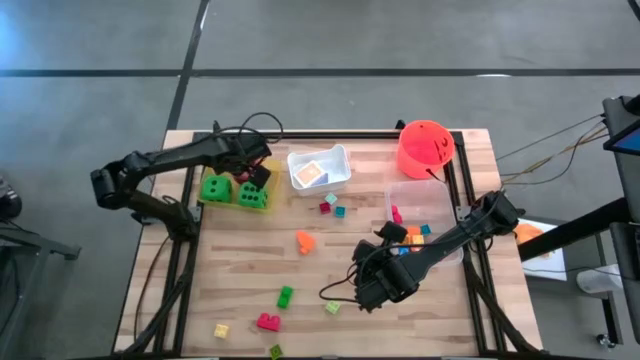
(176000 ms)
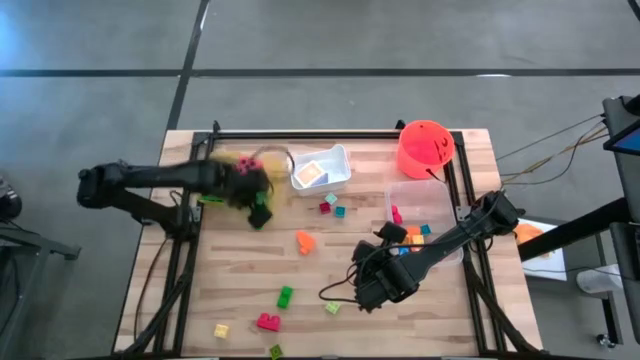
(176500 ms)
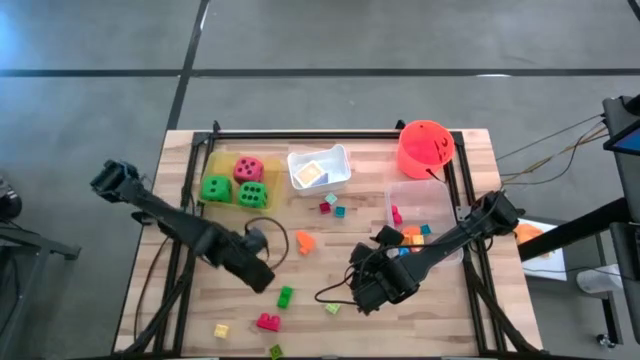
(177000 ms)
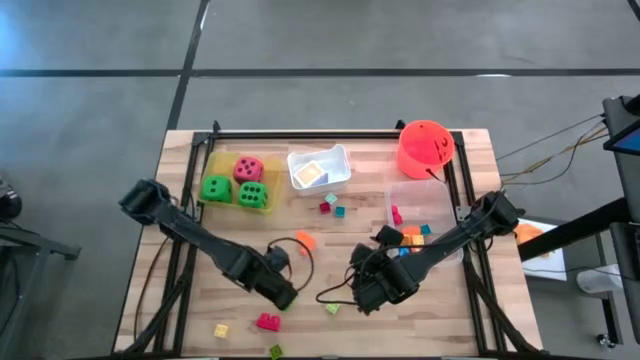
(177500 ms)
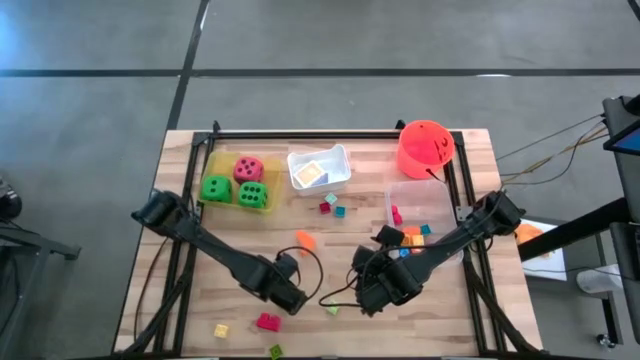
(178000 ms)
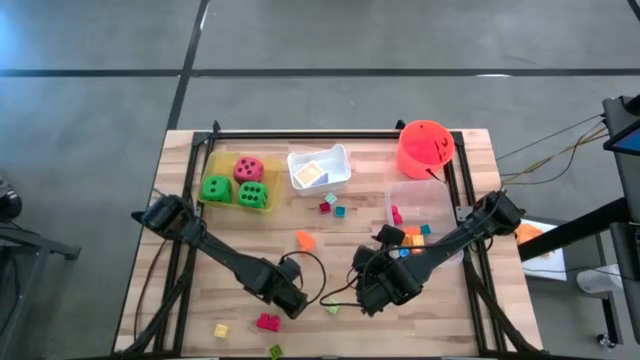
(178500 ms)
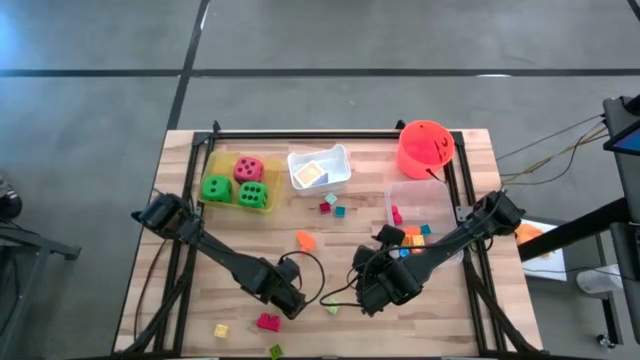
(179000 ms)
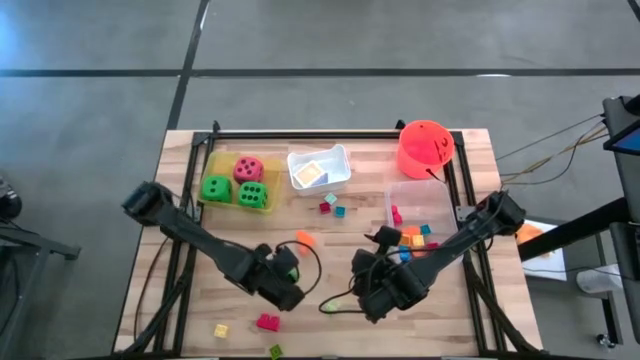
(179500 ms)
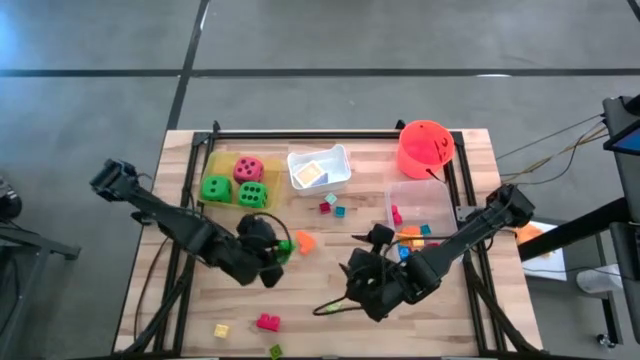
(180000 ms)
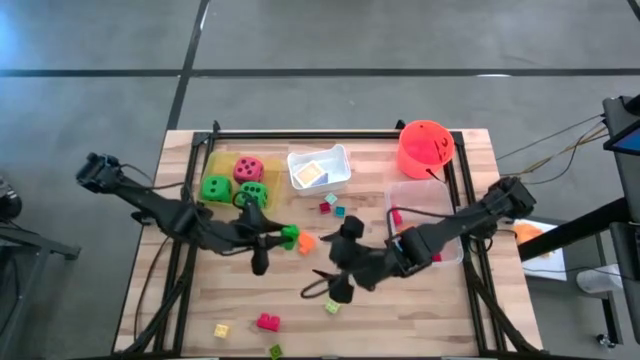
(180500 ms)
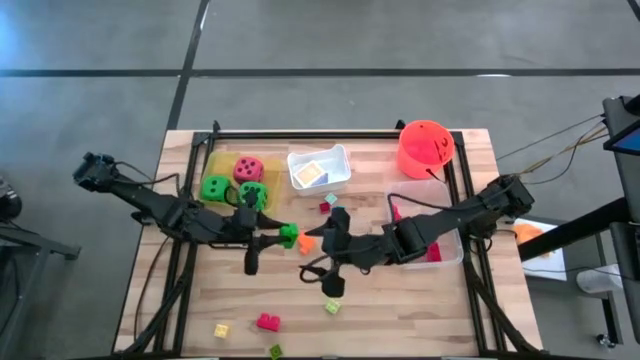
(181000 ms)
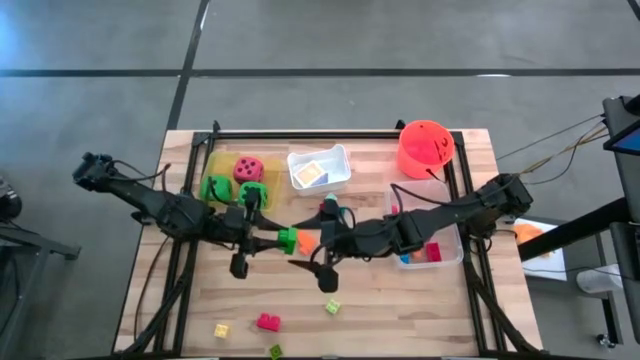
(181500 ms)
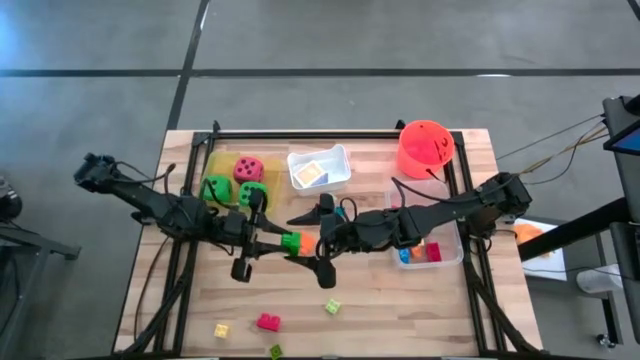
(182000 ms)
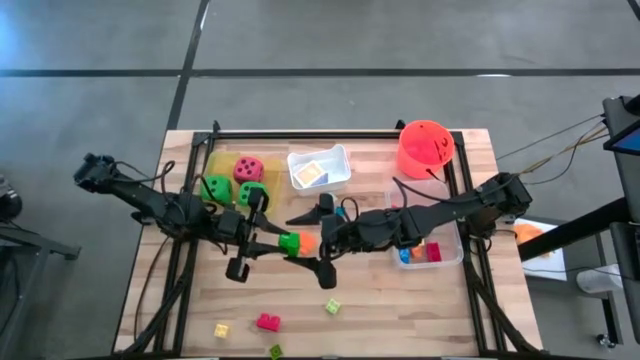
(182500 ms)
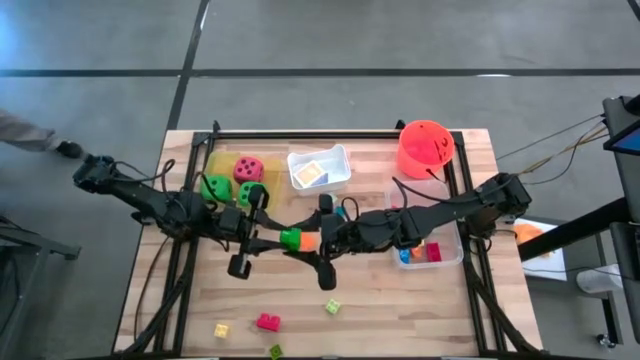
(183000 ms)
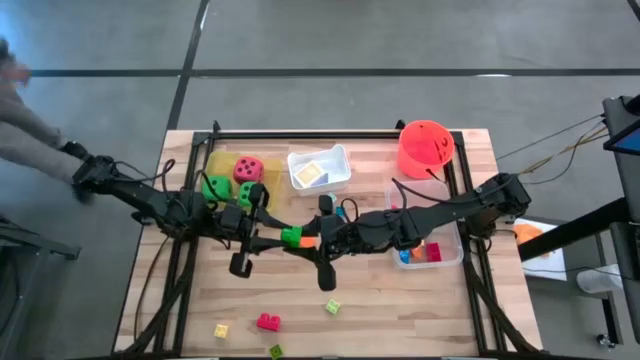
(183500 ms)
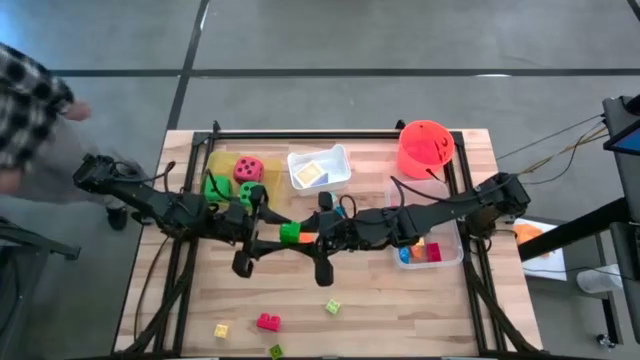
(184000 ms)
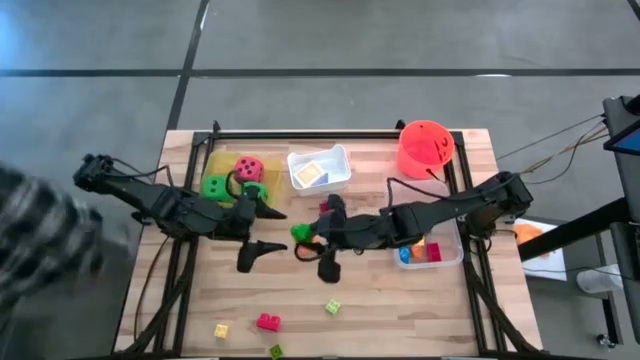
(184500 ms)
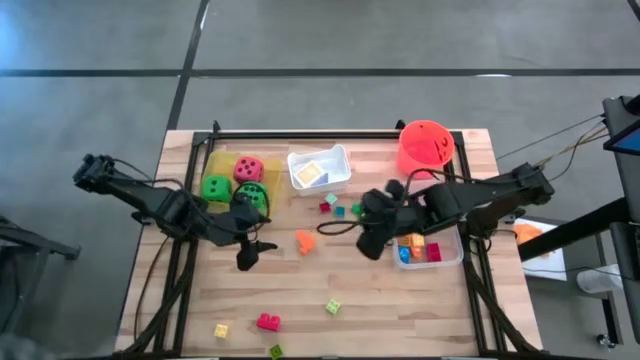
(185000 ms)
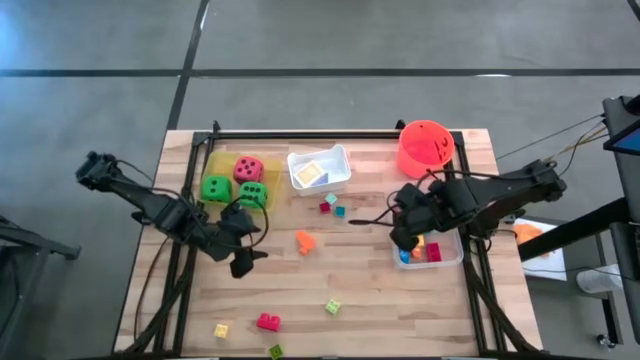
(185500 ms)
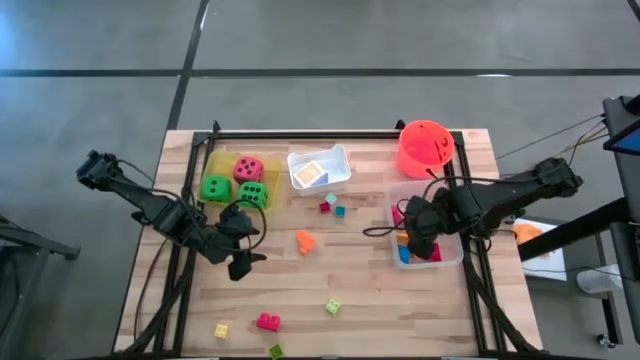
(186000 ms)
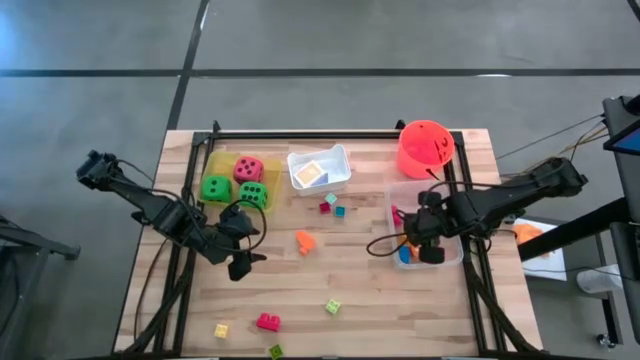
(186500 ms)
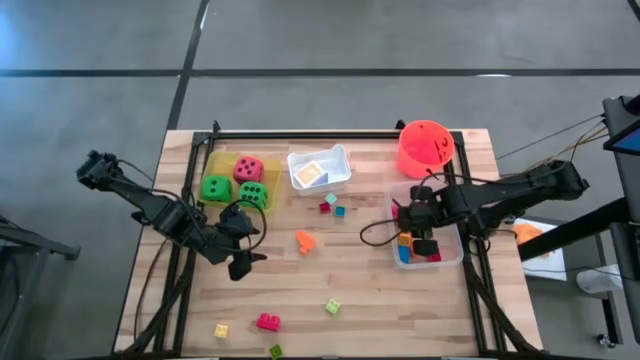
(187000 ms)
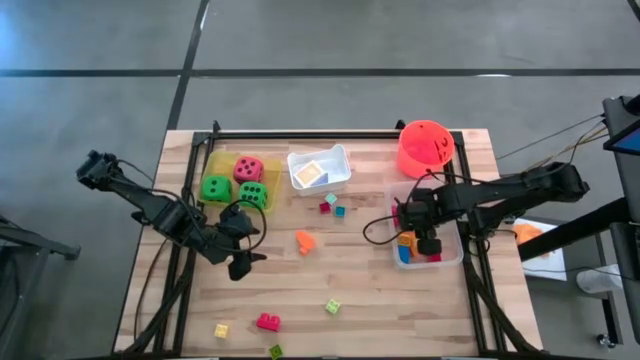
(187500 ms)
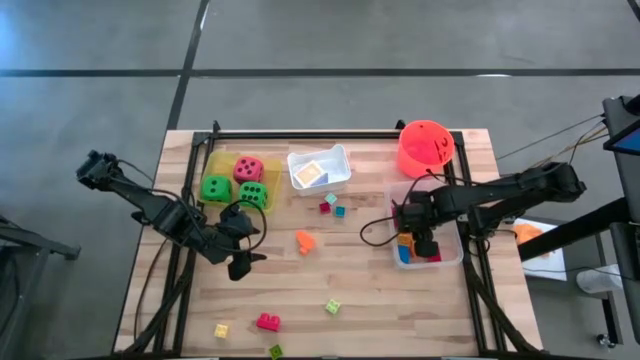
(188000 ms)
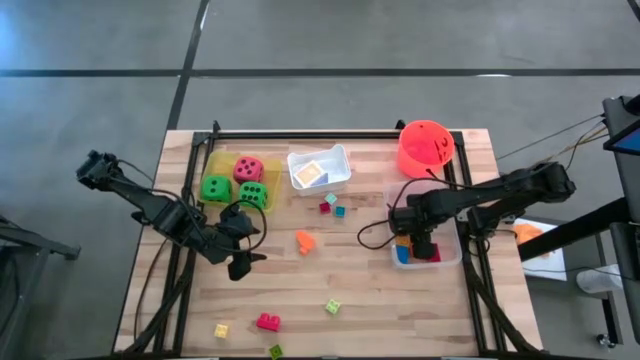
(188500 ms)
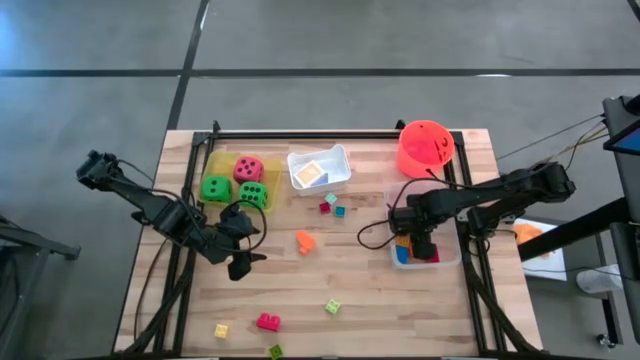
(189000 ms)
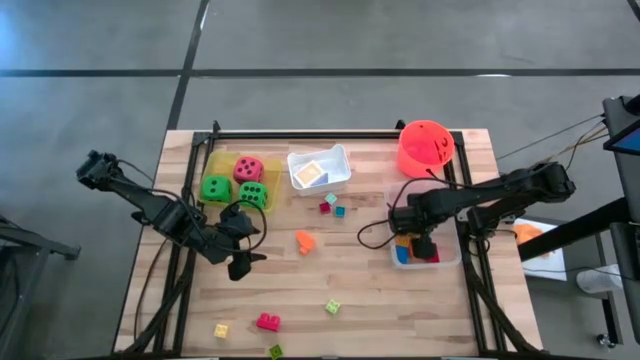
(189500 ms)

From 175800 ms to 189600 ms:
Task: Pick & Place Toys
Put the dark green game piece into the transparent bin

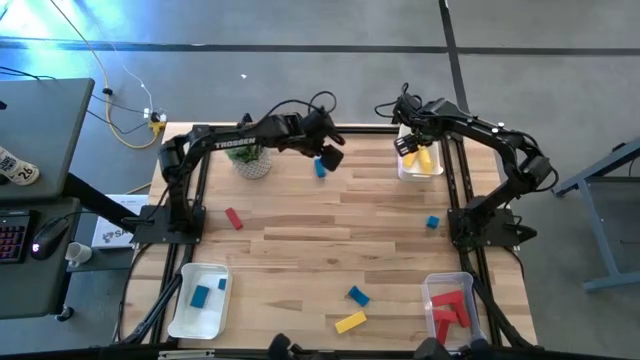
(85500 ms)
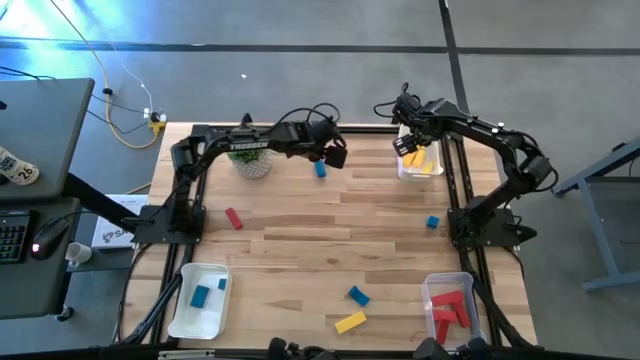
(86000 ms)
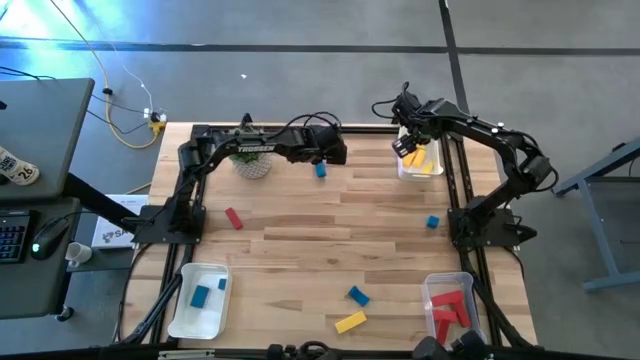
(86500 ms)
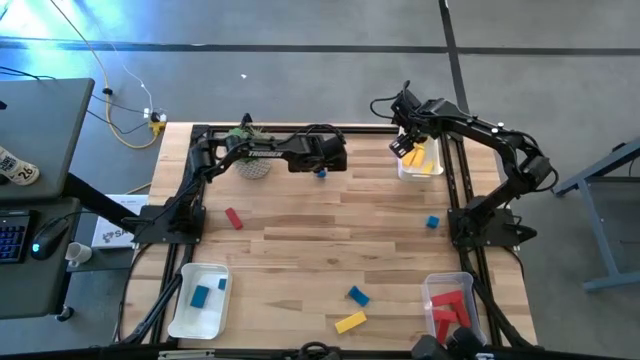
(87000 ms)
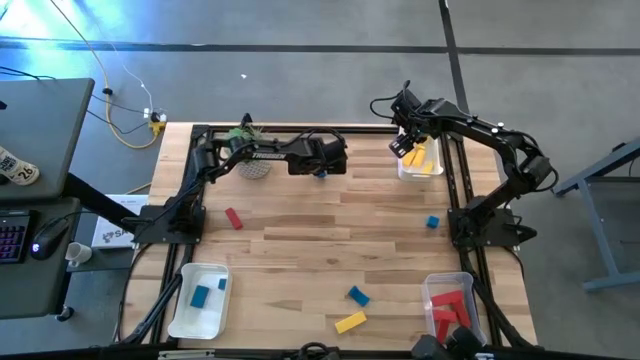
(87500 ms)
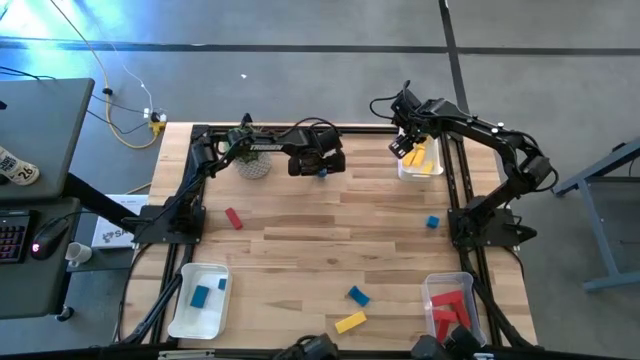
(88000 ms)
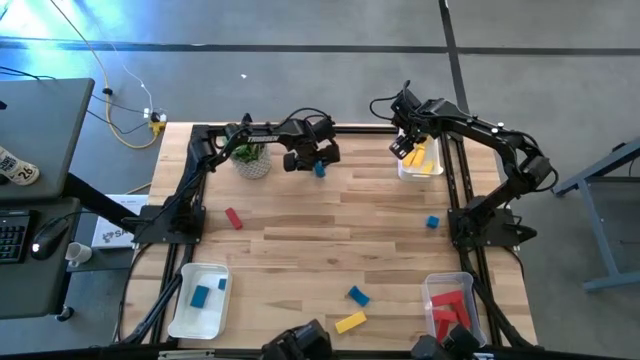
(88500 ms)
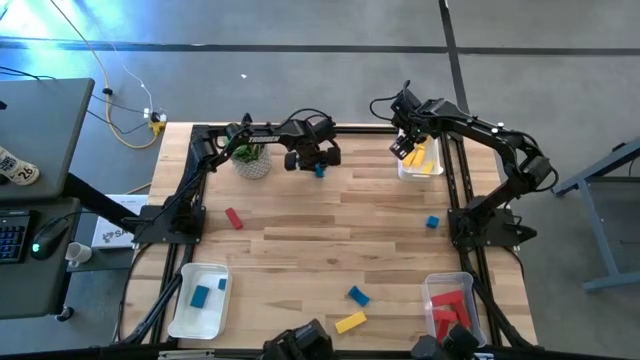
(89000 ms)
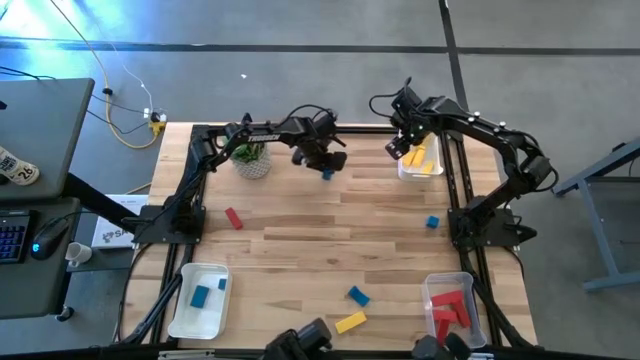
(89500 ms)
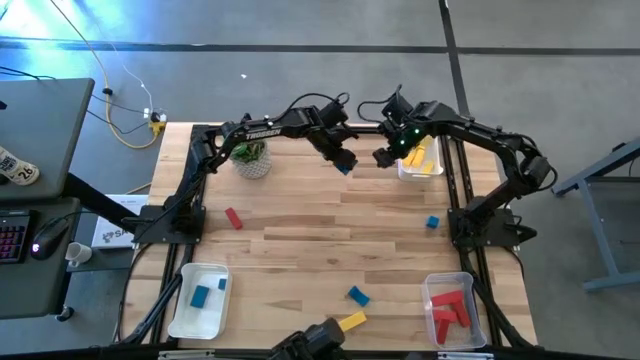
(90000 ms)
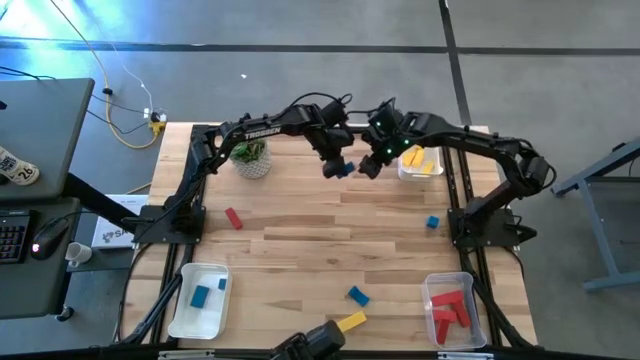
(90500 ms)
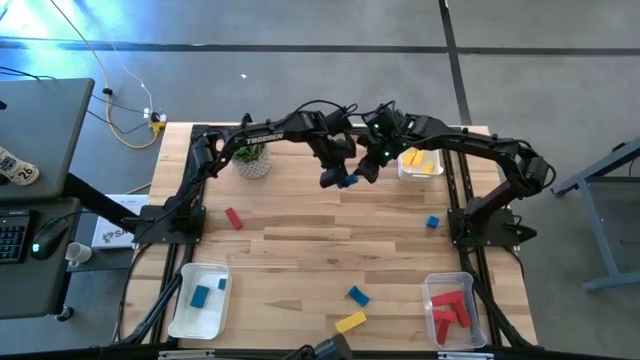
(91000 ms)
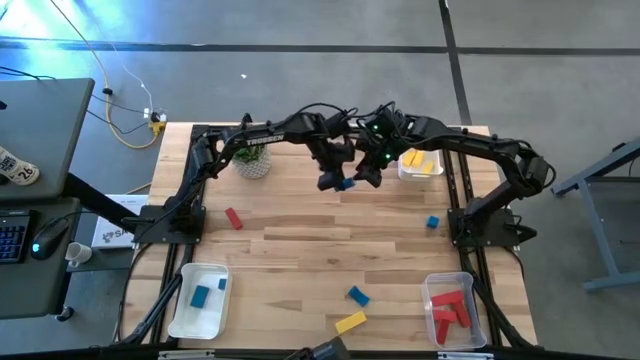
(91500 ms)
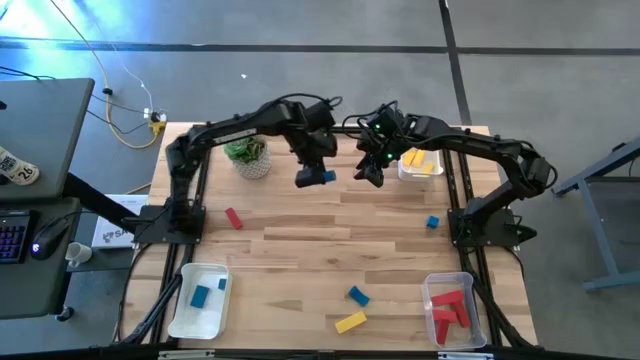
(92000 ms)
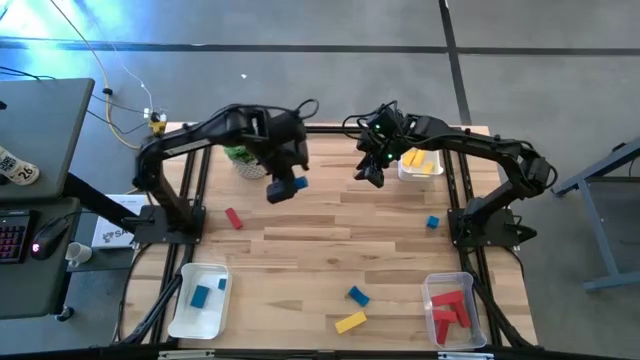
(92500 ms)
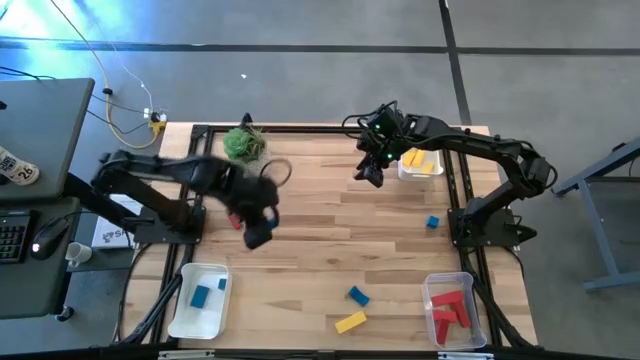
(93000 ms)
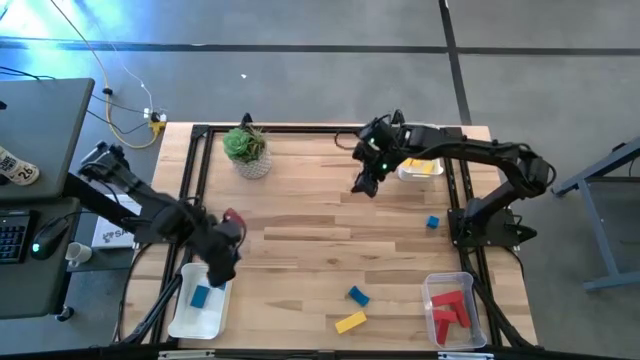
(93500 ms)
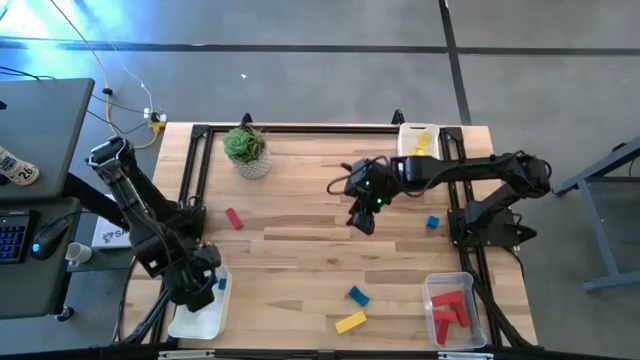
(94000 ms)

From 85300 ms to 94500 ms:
Task: Sort & place blocks by color
Put the blue block into the bottom white bin
